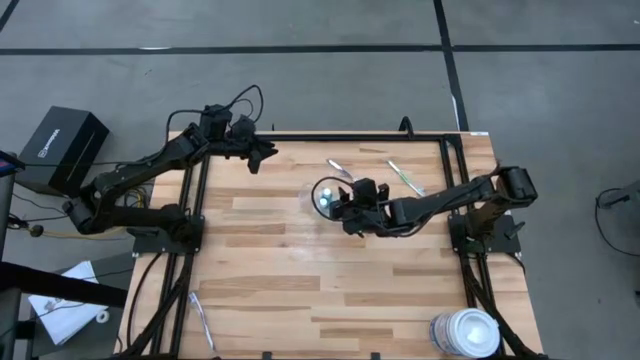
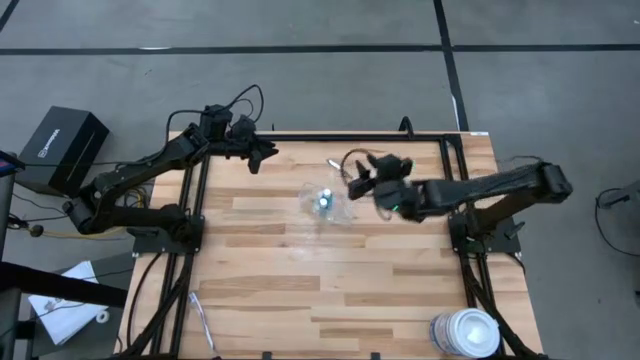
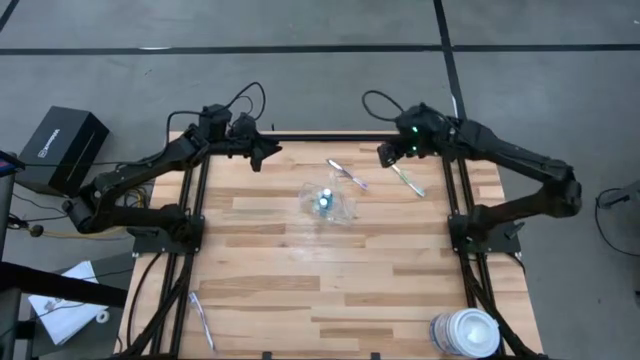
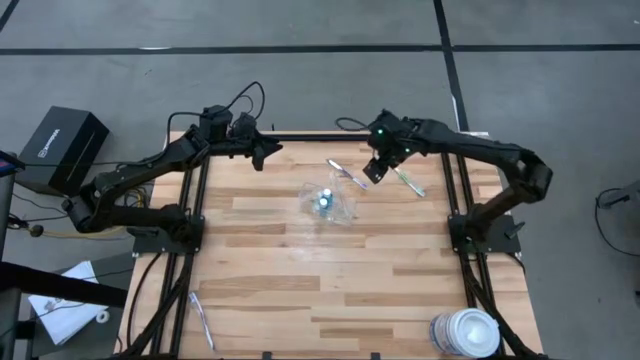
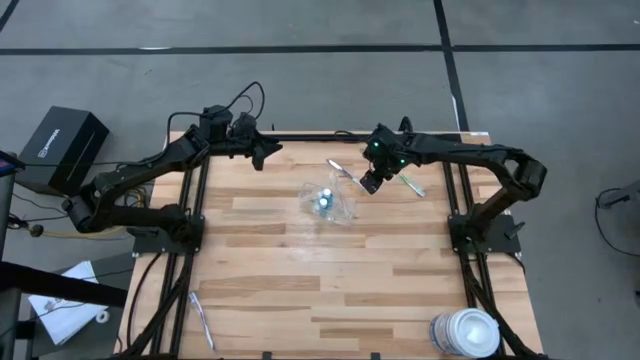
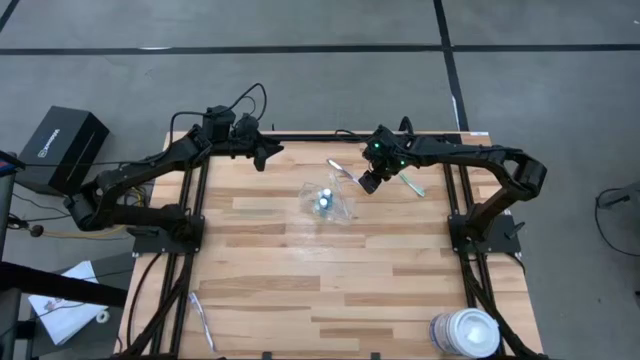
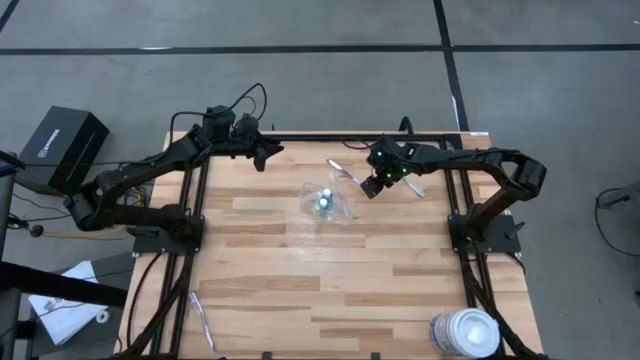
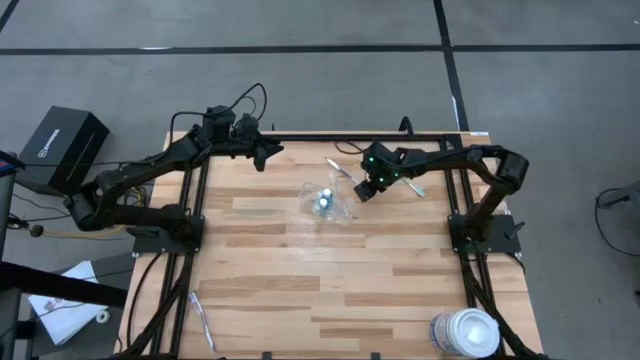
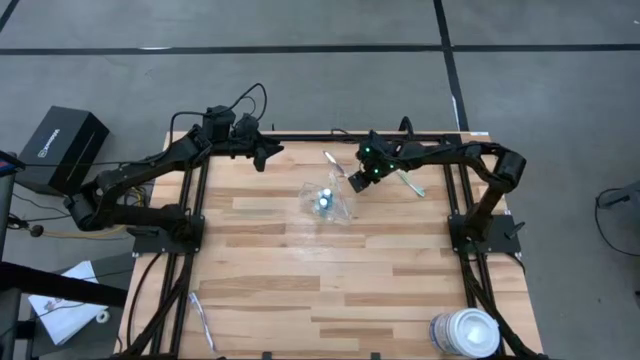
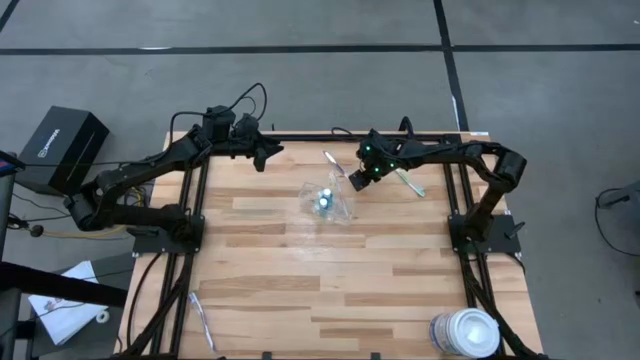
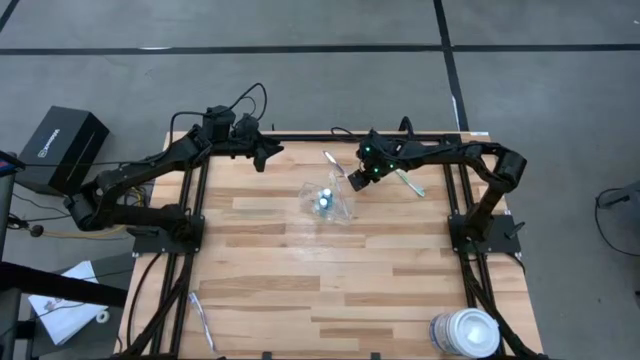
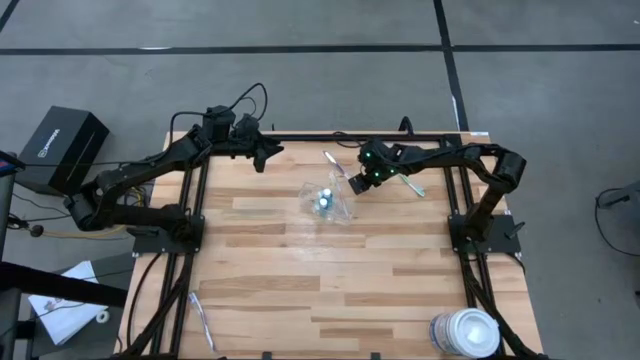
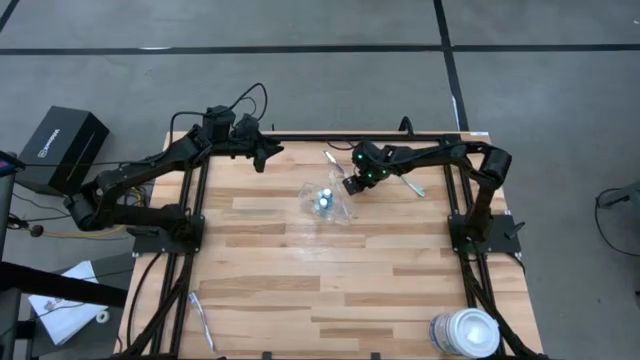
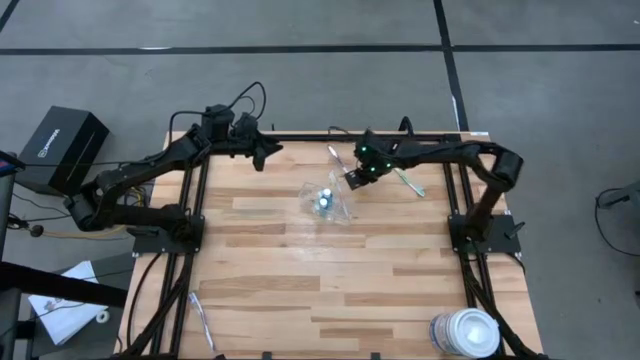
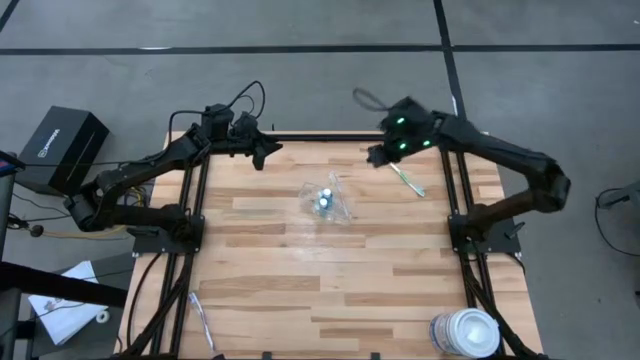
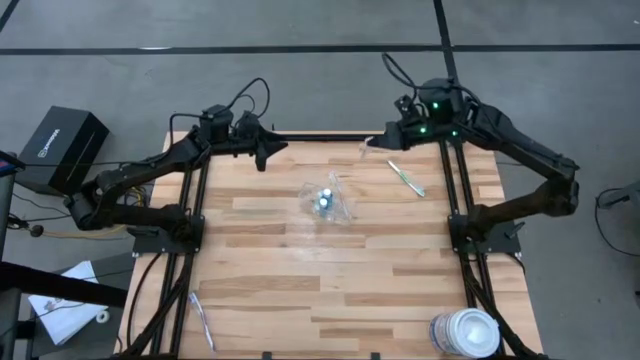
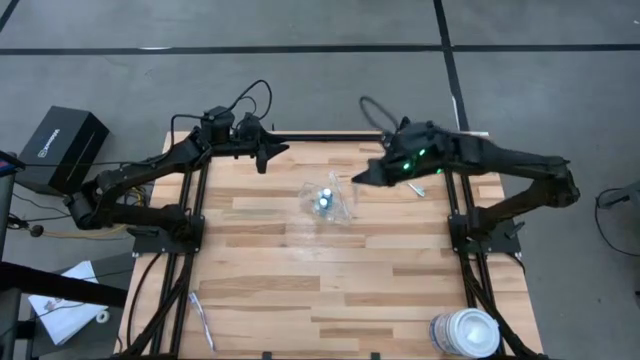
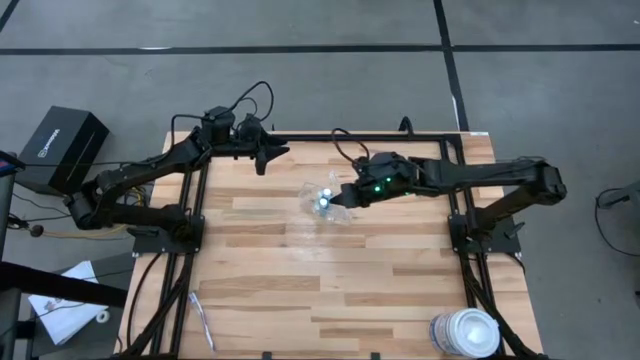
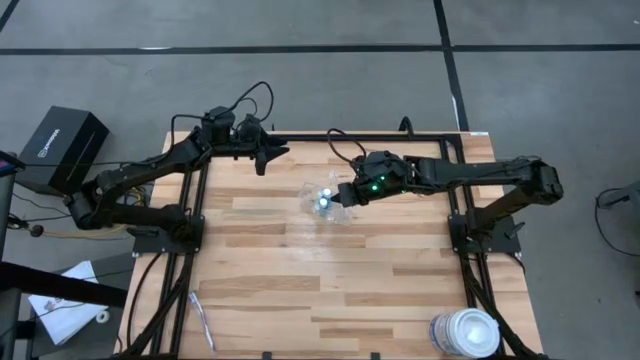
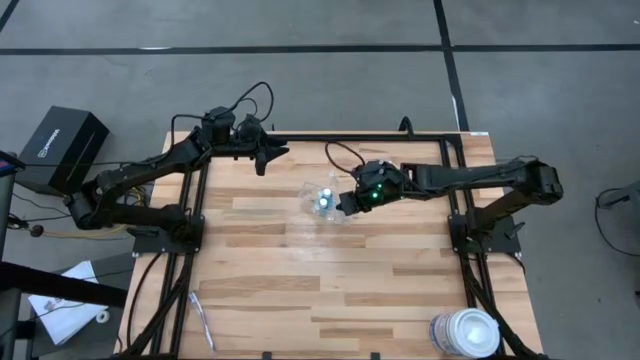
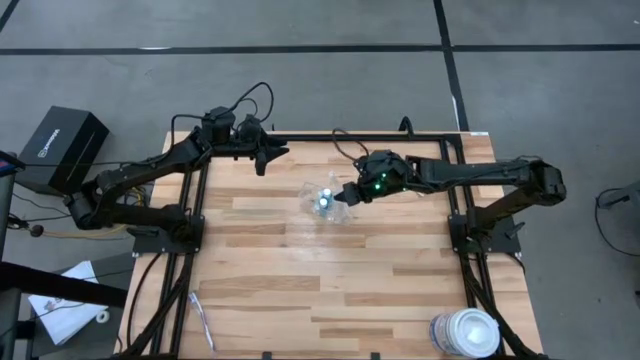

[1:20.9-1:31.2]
Task: Pick & Place toothbrushing station
Put the top purple toothbrush into the transparent organizer

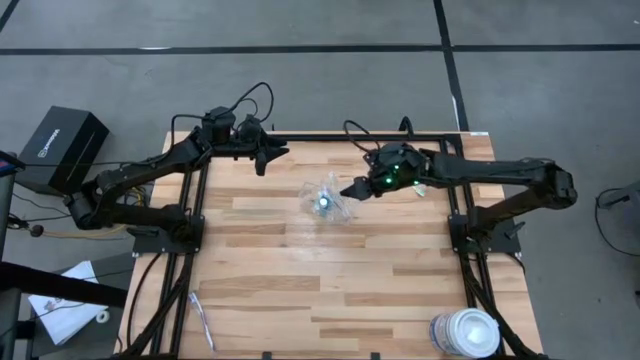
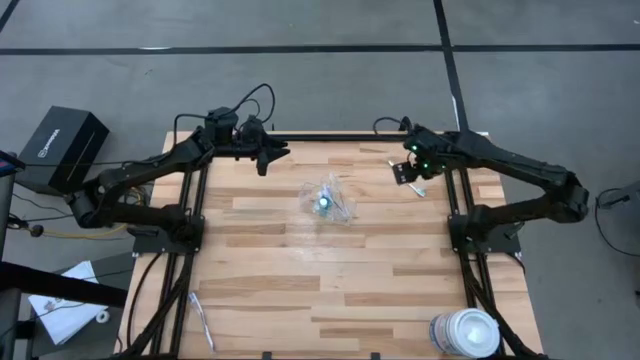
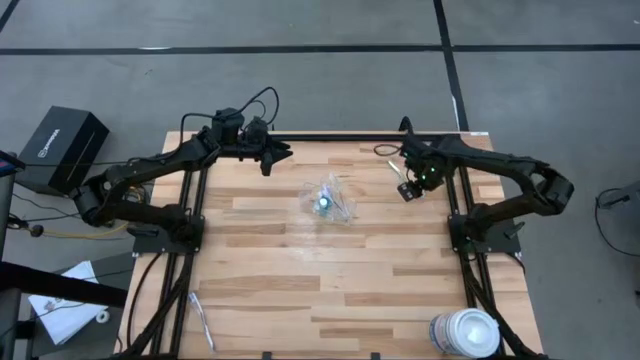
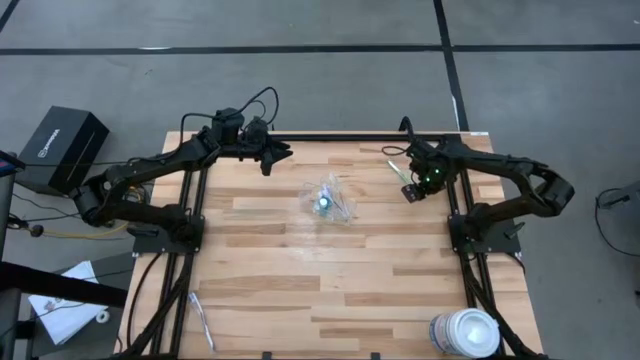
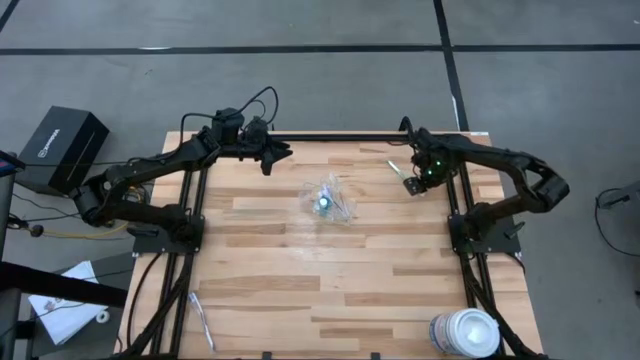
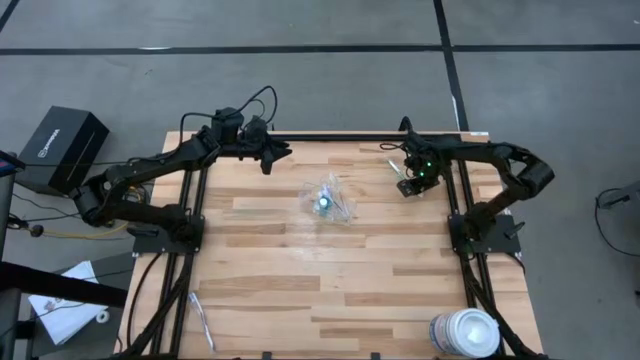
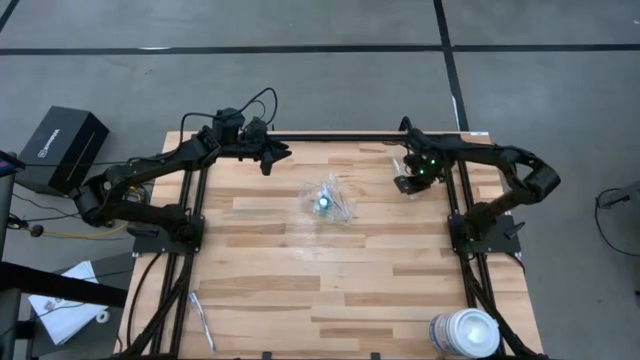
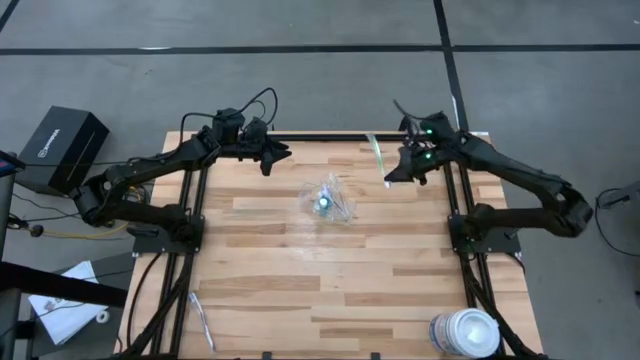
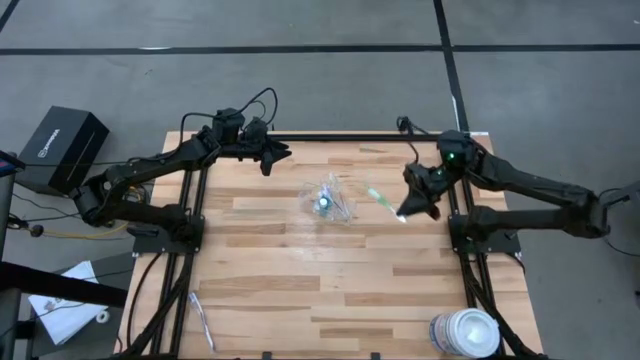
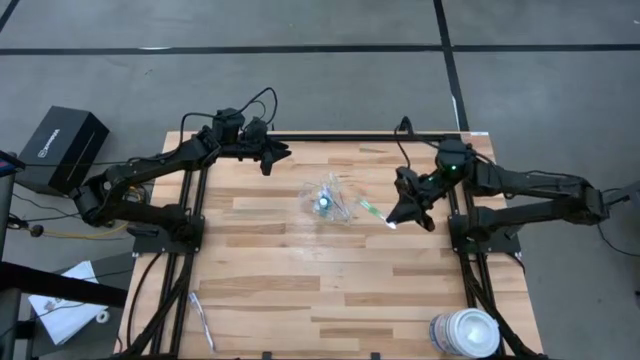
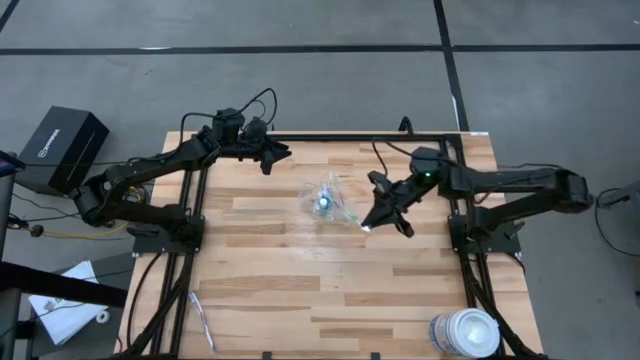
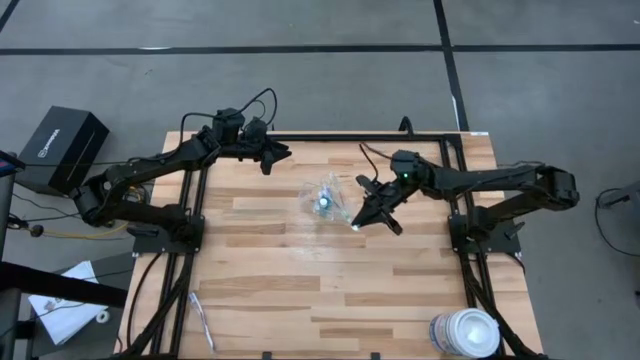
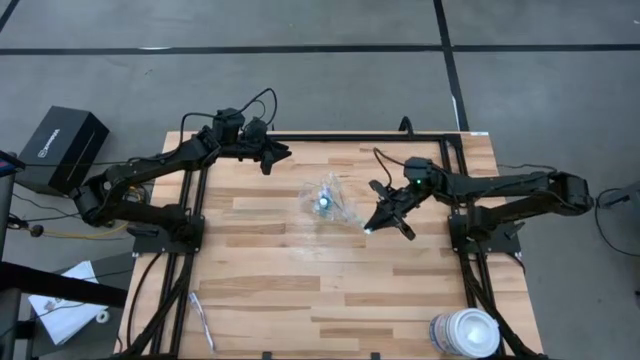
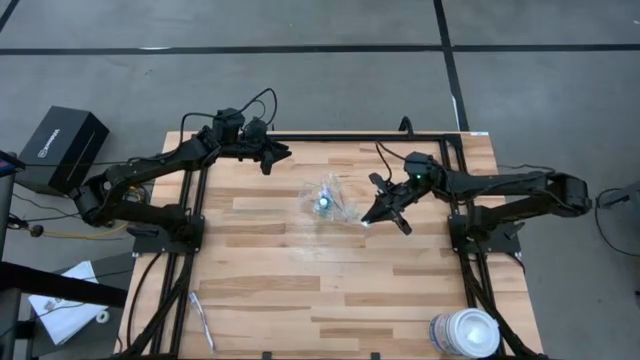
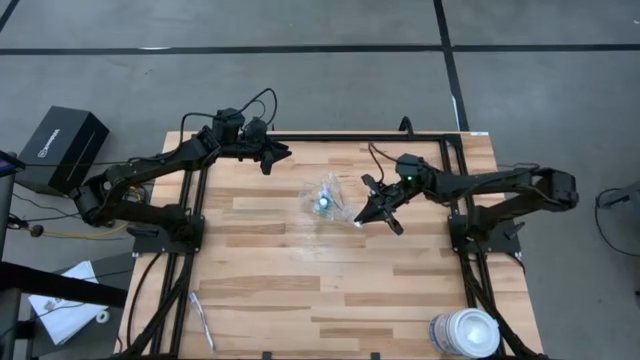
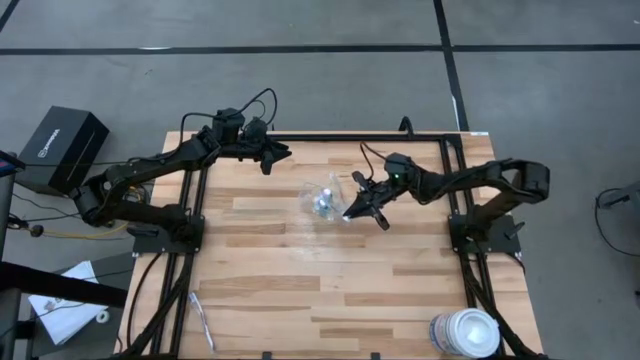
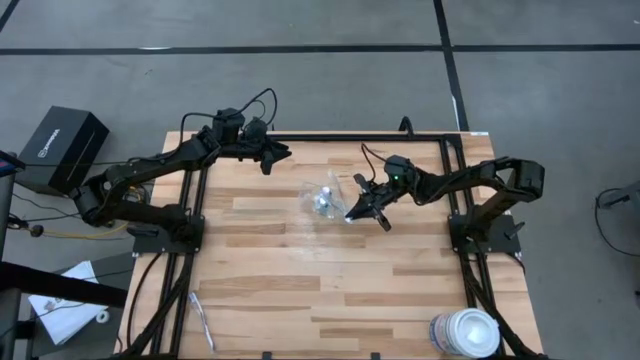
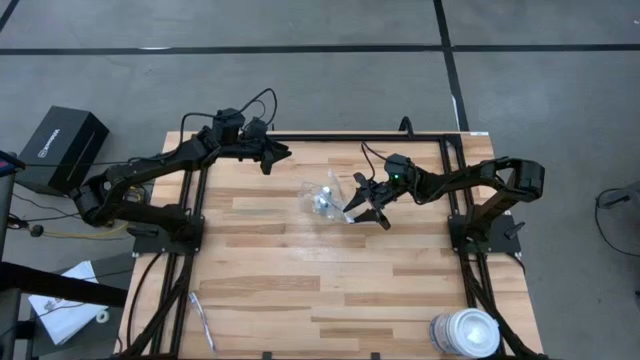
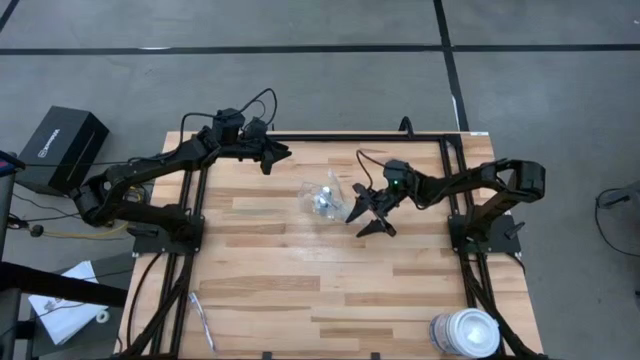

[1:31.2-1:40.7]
Put the green toothbrush into the transparent organizer
